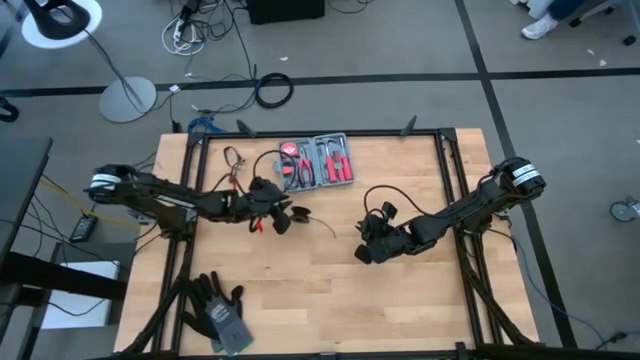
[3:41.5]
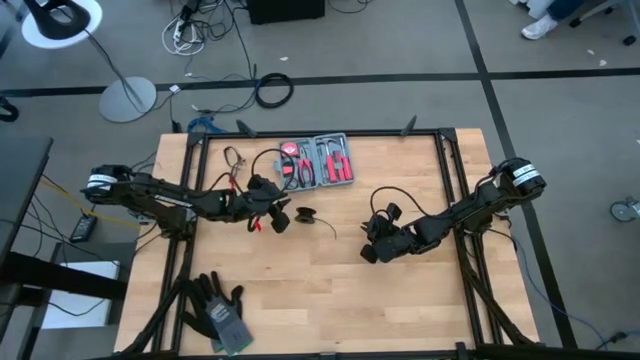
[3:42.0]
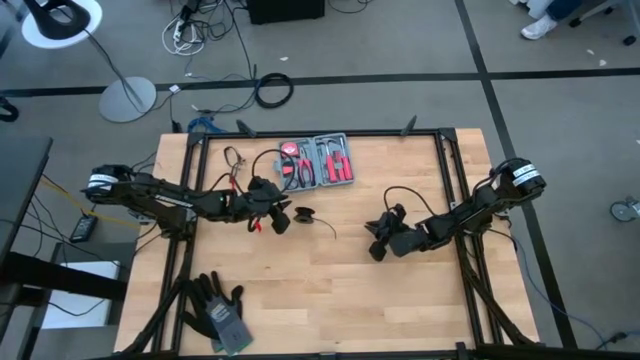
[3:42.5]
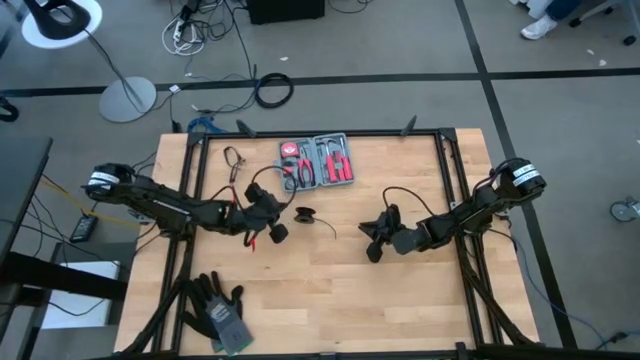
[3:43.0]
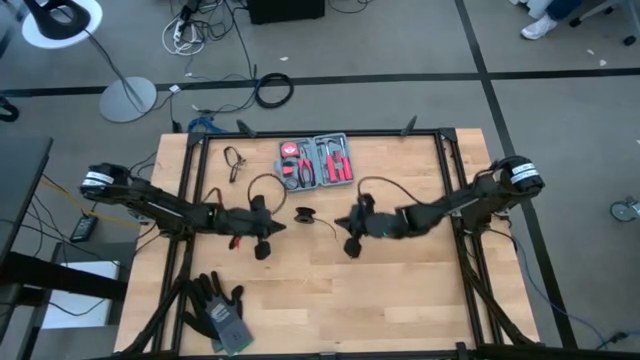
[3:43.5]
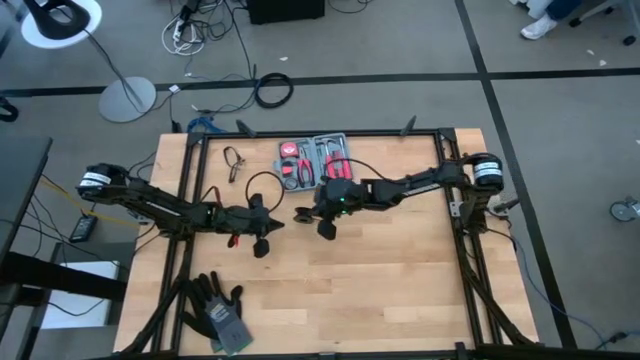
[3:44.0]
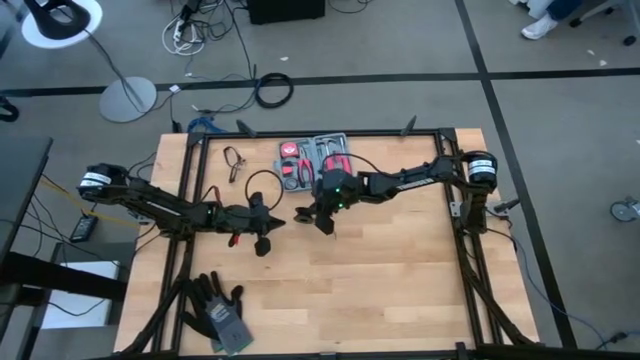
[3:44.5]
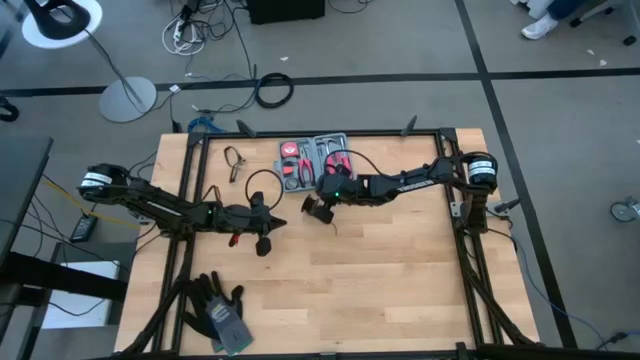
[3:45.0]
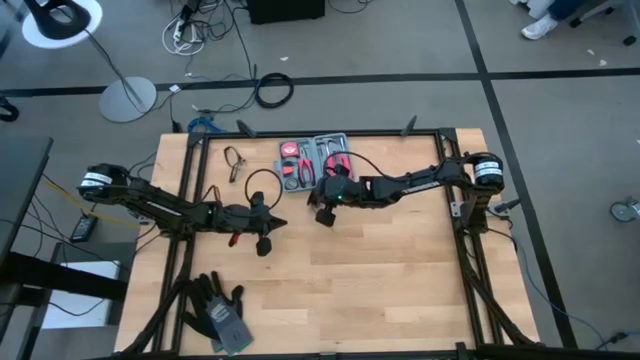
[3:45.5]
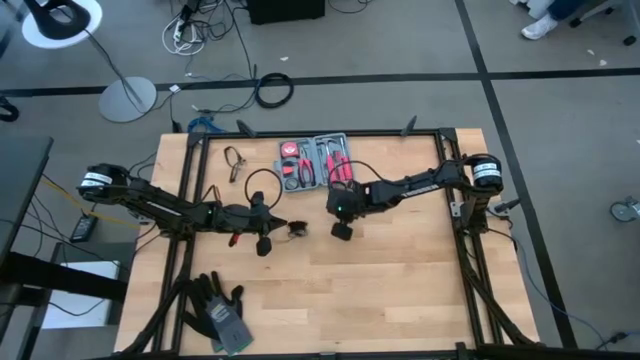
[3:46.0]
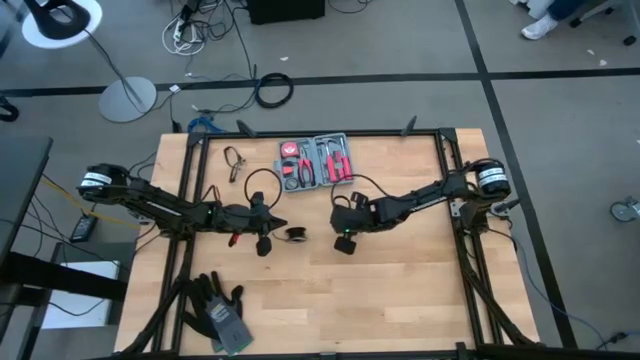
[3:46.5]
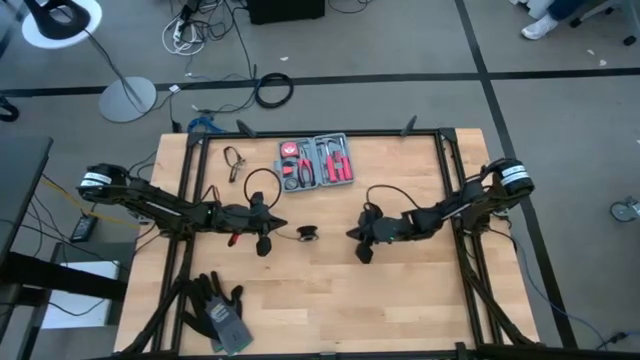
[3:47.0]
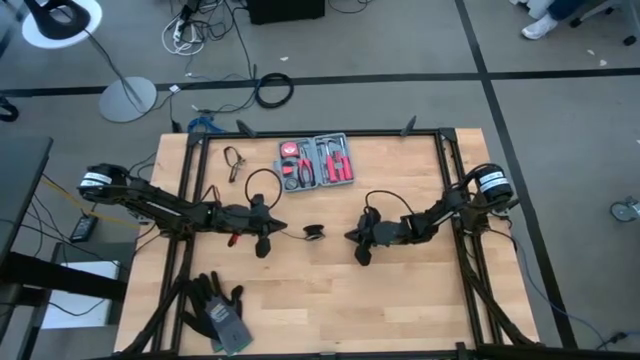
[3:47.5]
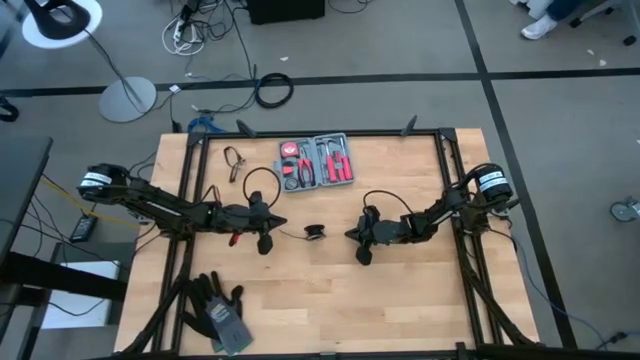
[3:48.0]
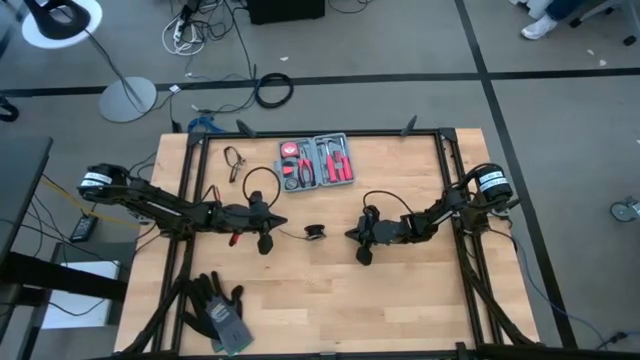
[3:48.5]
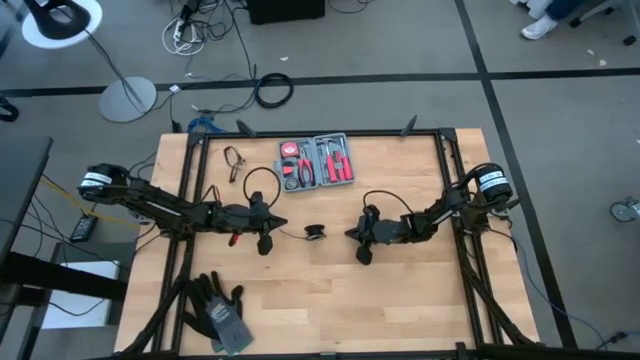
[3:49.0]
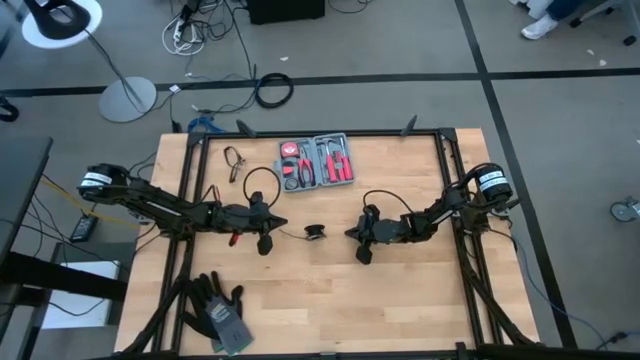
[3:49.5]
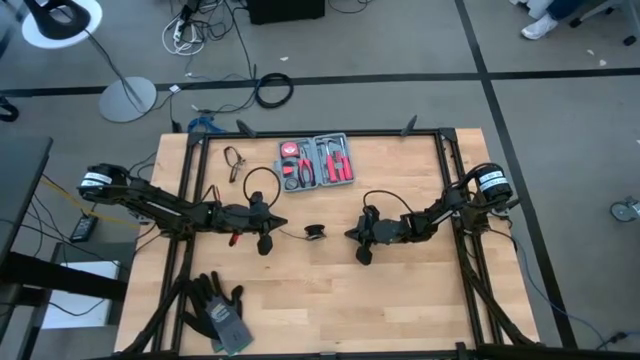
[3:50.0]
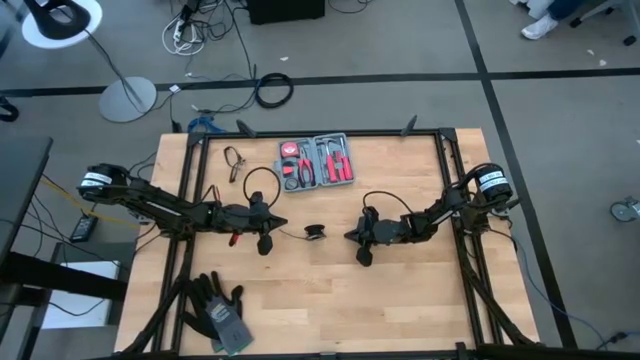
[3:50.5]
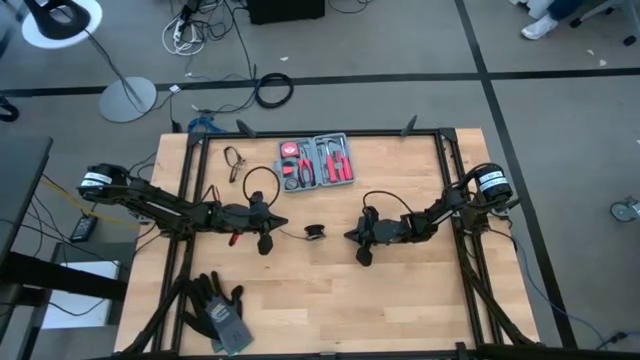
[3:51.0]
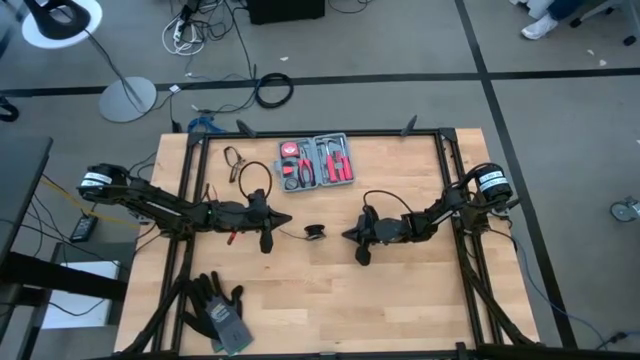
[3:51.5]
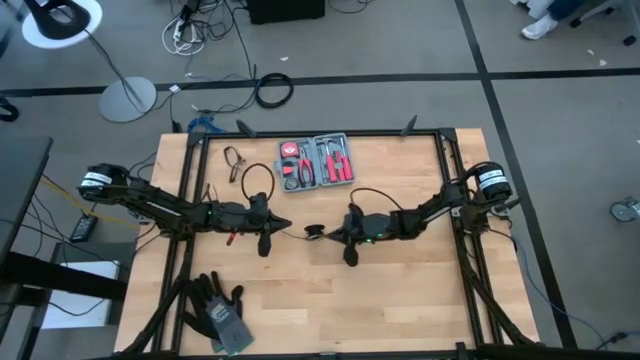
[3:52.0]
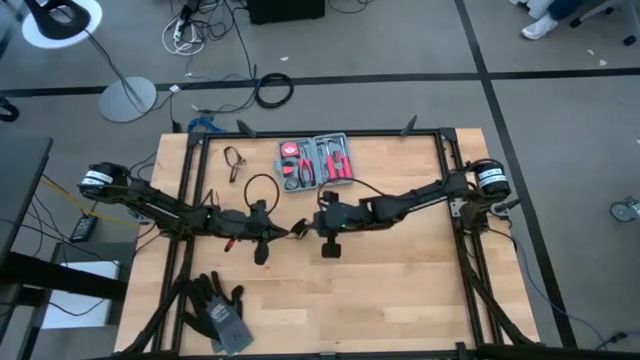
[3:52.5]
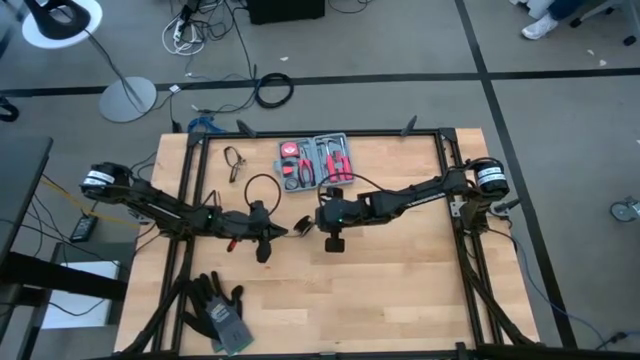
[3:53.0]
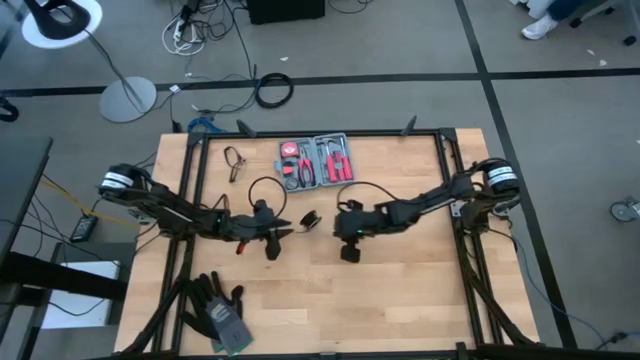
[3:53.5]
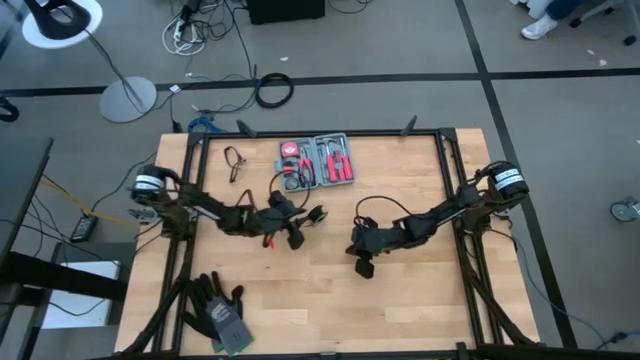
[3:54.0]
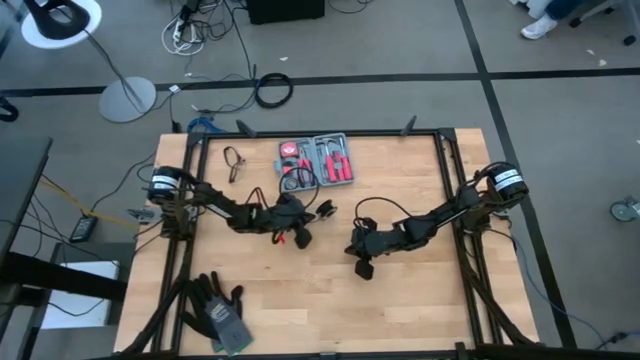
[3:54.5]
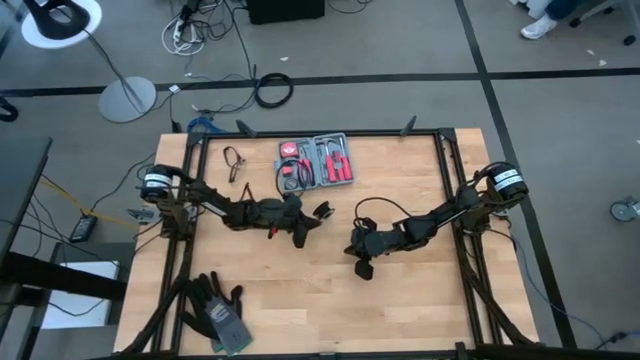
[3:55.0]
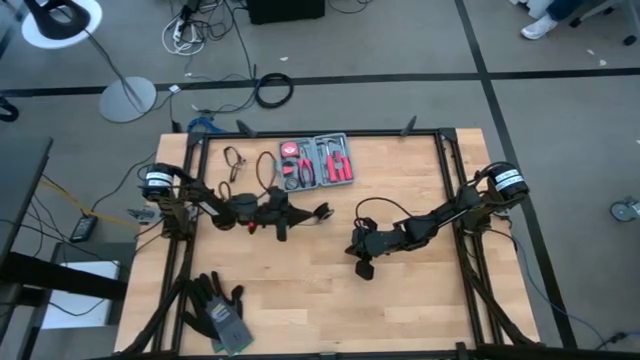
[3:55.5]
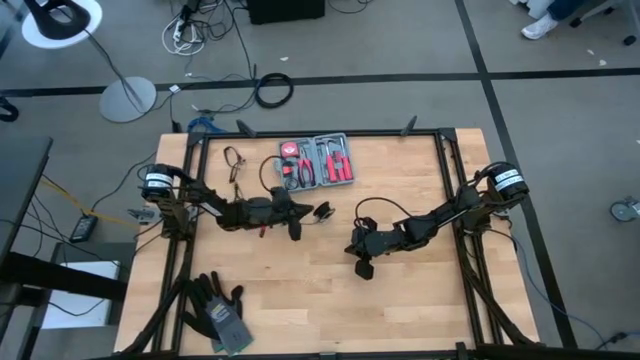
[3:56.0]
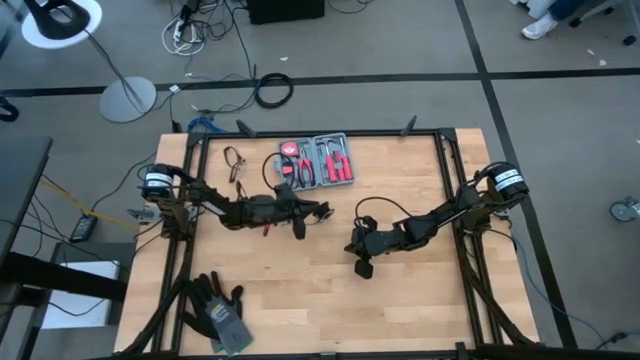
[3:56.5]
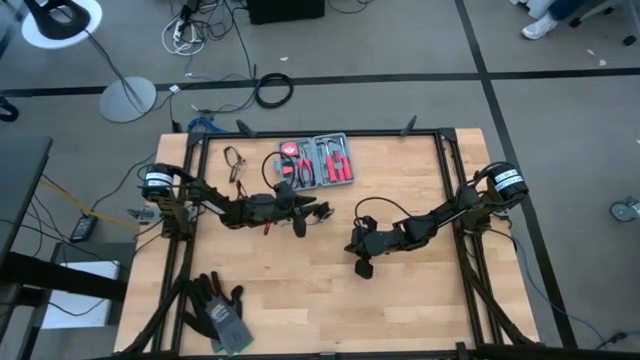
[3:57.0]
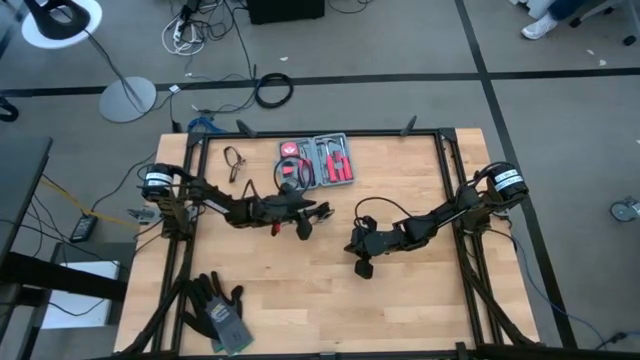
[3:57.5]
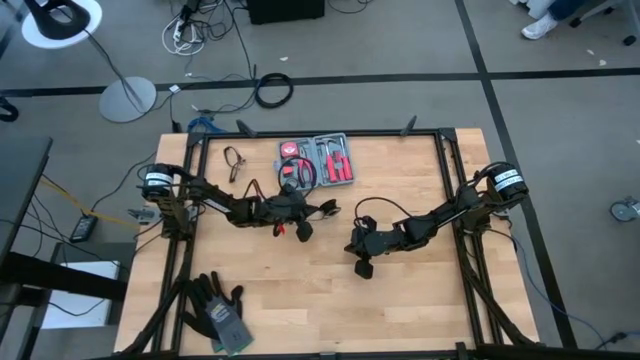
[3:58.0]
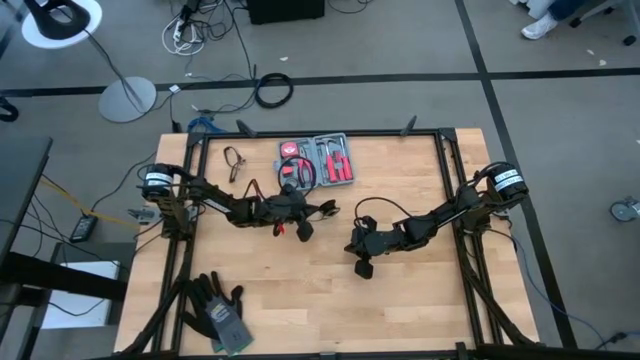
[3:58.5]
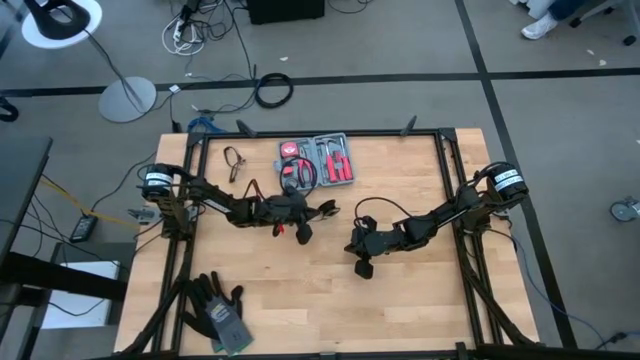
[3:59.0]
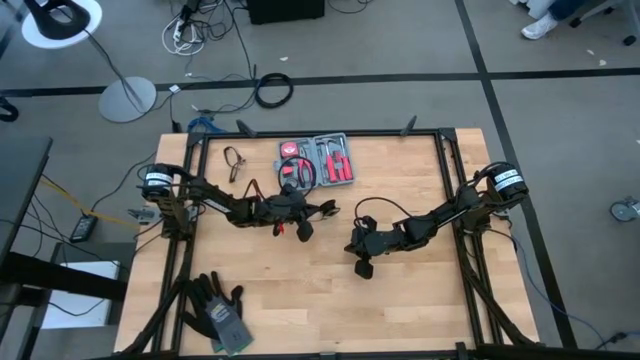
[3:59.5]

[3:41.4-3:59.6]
Task: Coil cords
Uncoil the black wire from the black spool

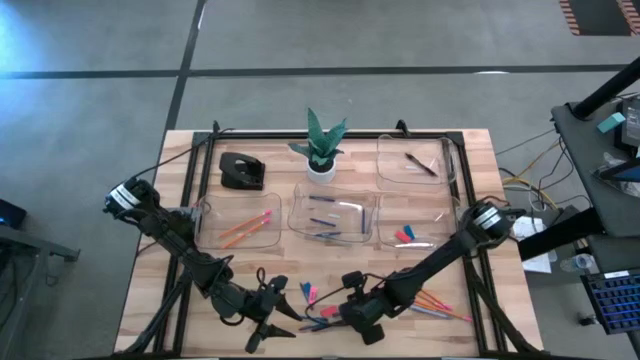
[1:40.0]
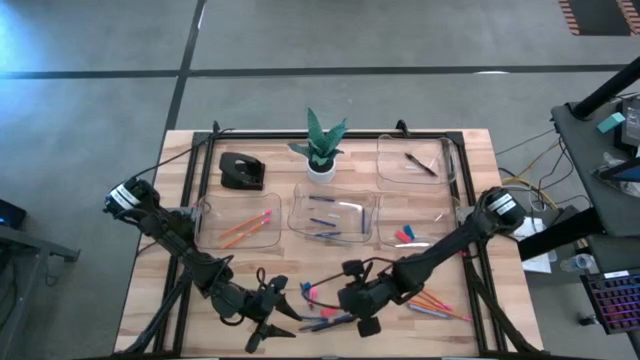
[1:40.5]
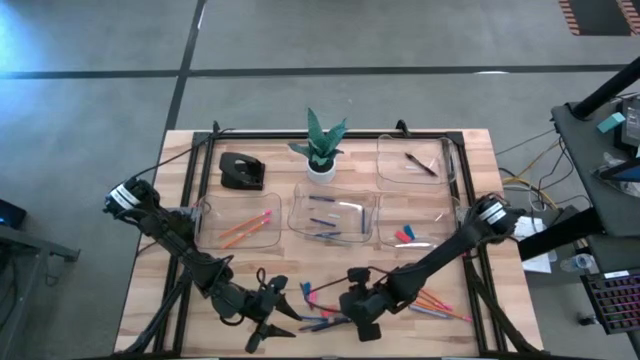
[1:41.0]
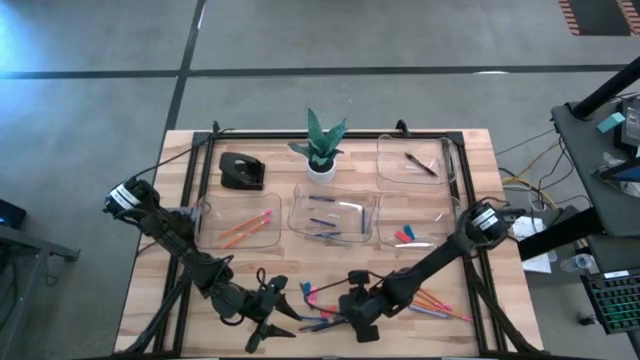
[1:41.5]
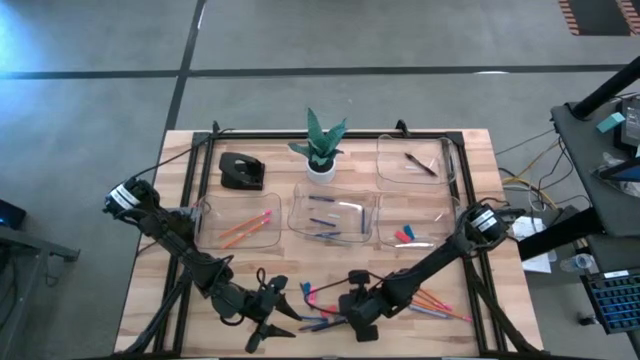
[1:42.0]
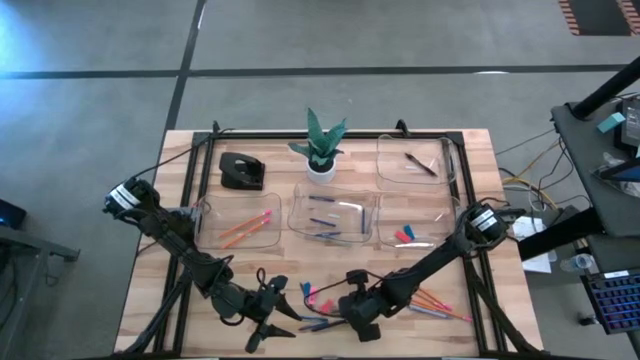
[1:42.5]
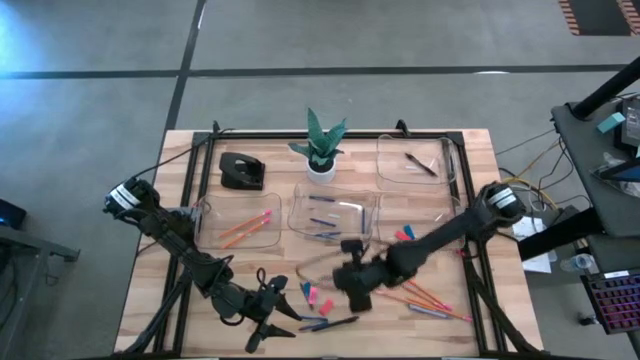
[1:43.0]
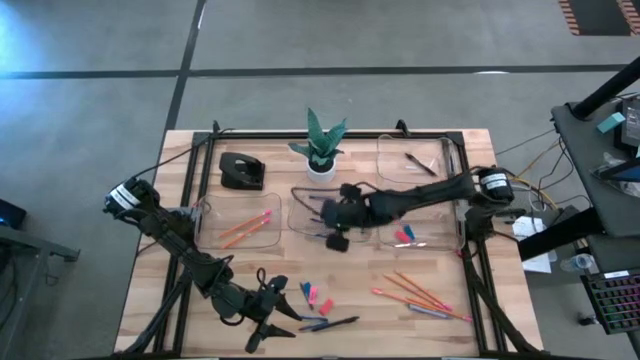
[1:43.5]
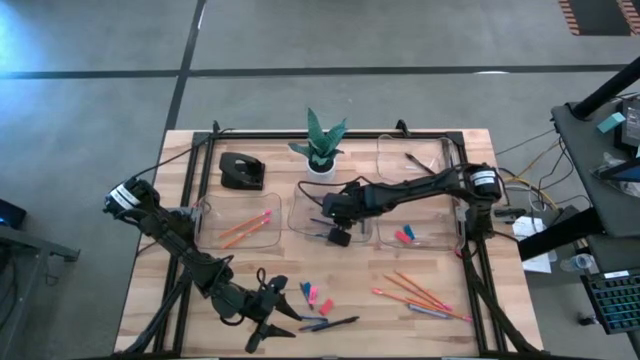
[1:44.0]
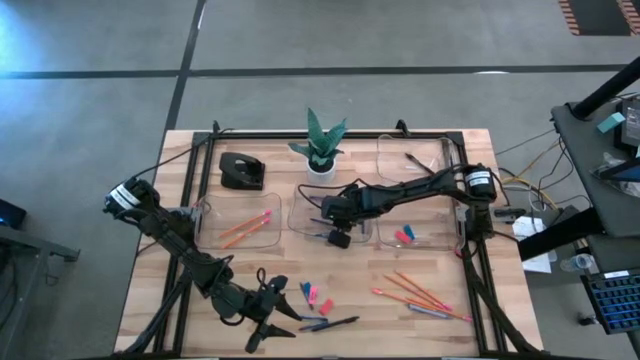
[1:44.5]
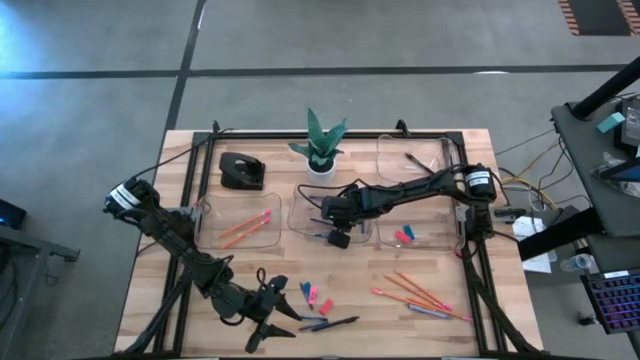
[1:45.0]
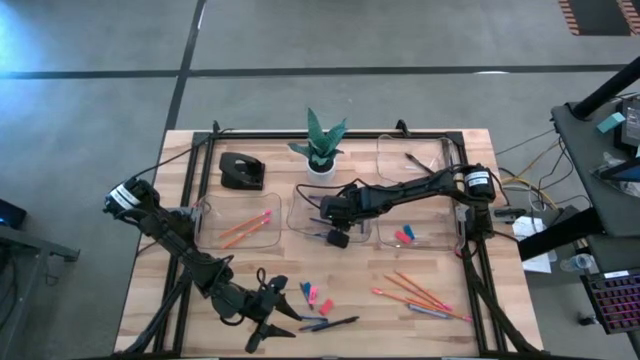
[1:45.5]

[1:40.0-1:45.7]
Task: Sort crayons/erasers/pens/pencils in bins
Put the blue crayon into the middle transparent bin
